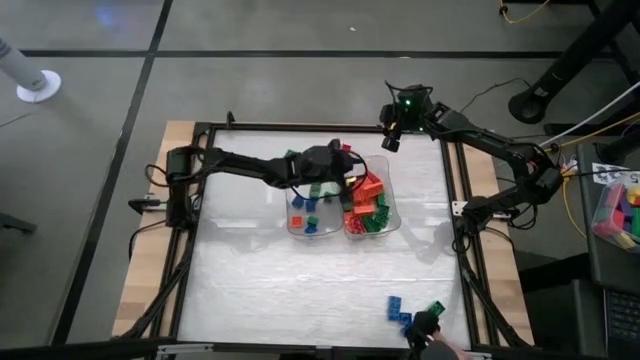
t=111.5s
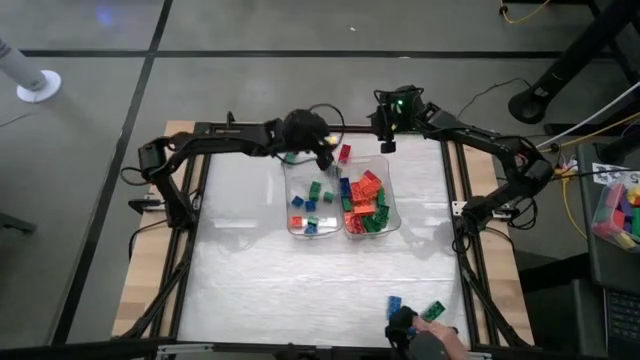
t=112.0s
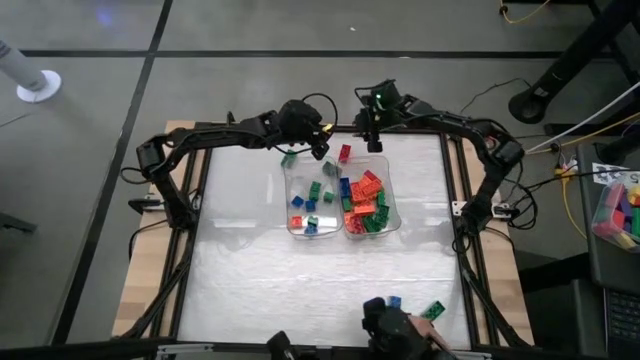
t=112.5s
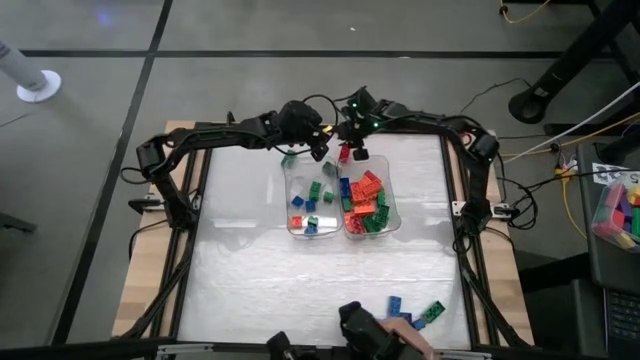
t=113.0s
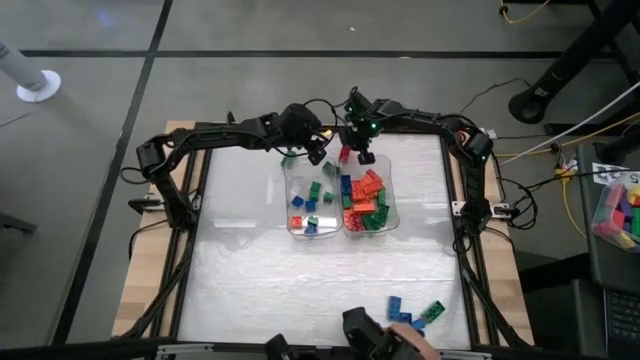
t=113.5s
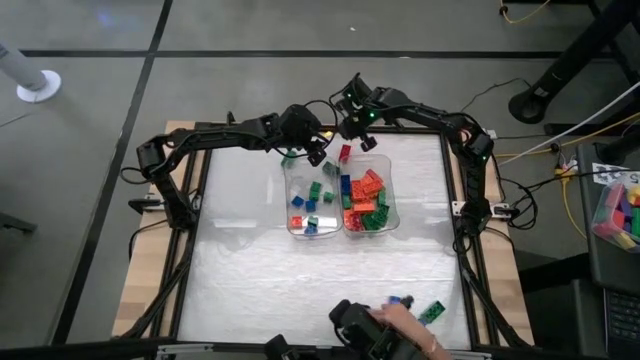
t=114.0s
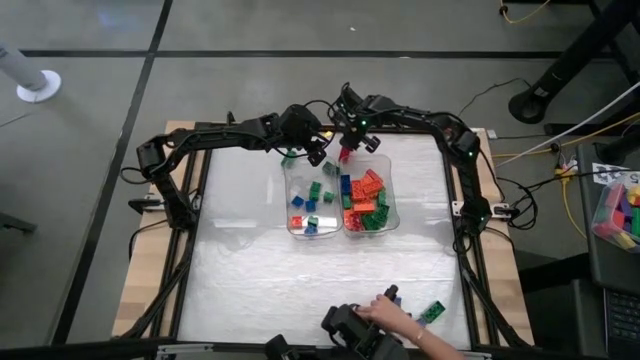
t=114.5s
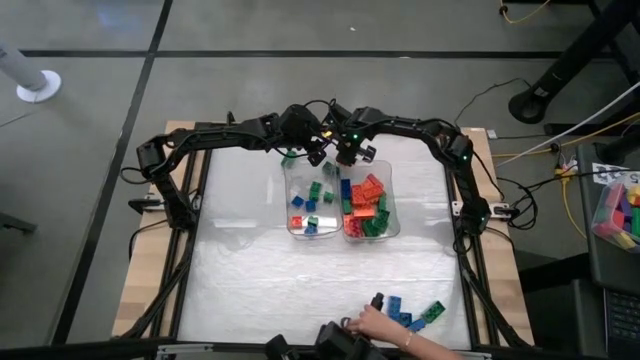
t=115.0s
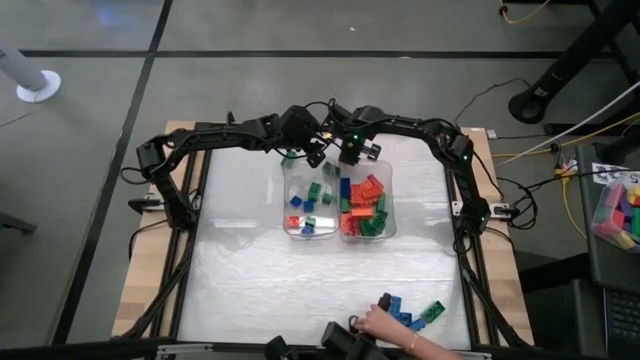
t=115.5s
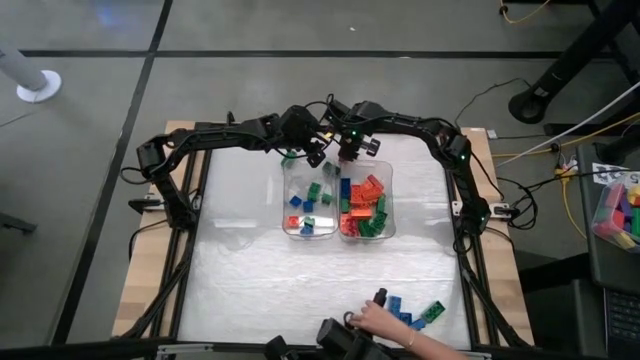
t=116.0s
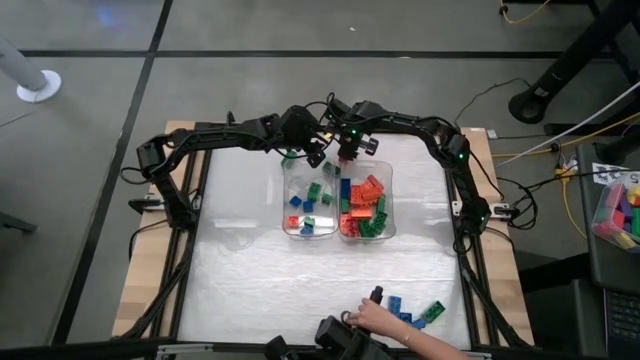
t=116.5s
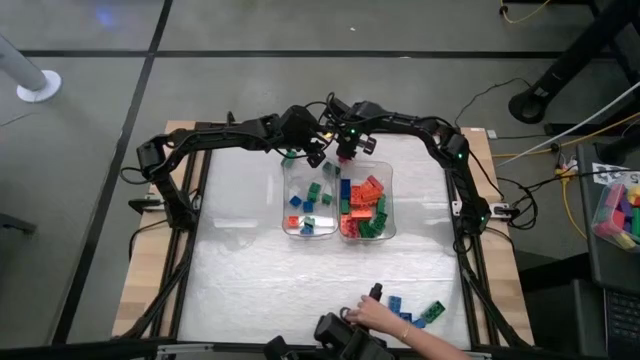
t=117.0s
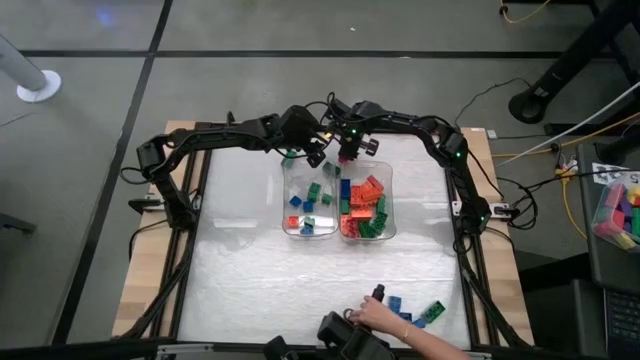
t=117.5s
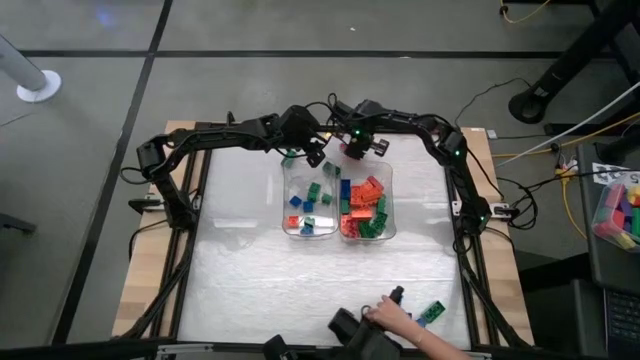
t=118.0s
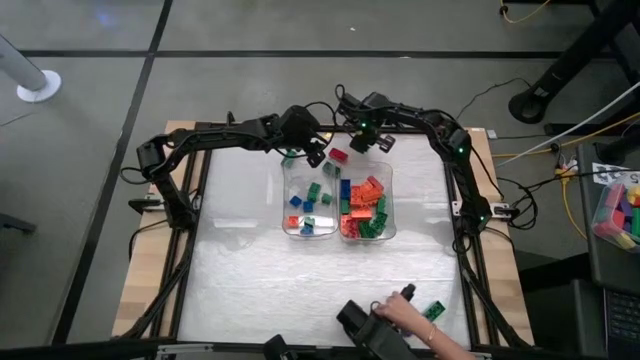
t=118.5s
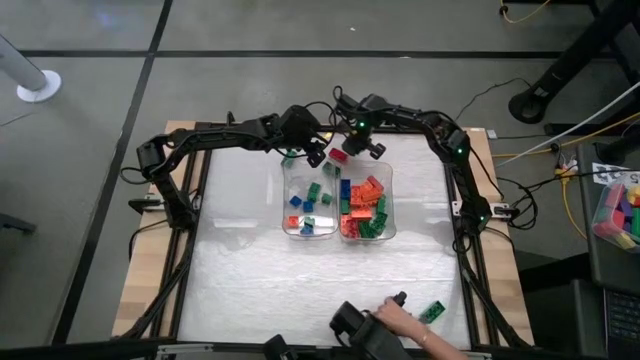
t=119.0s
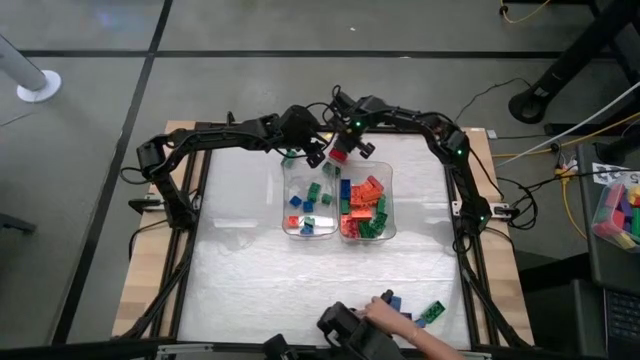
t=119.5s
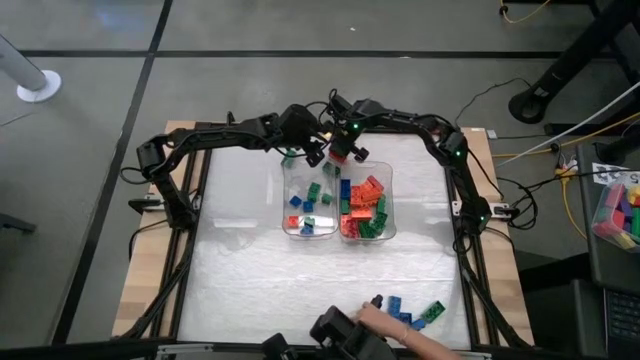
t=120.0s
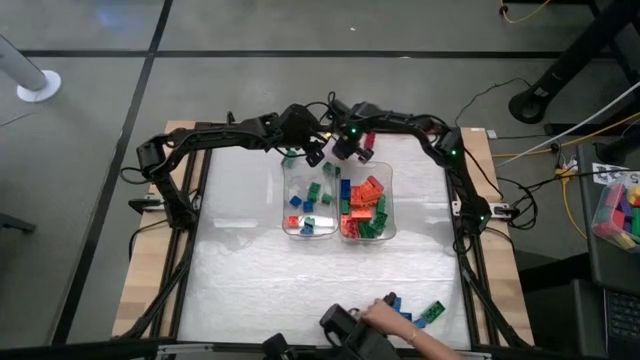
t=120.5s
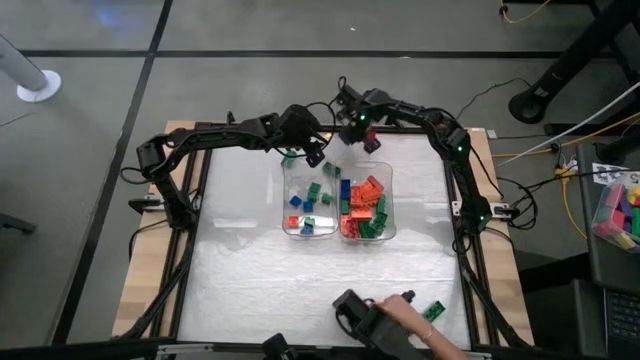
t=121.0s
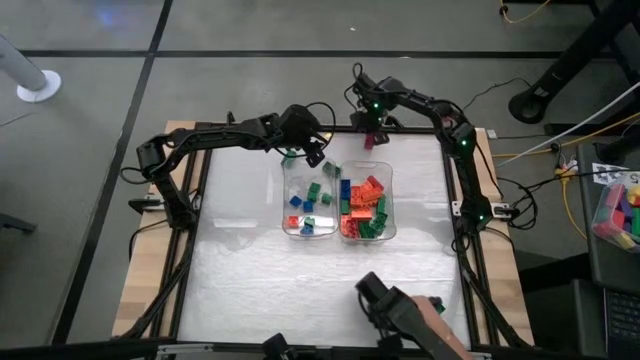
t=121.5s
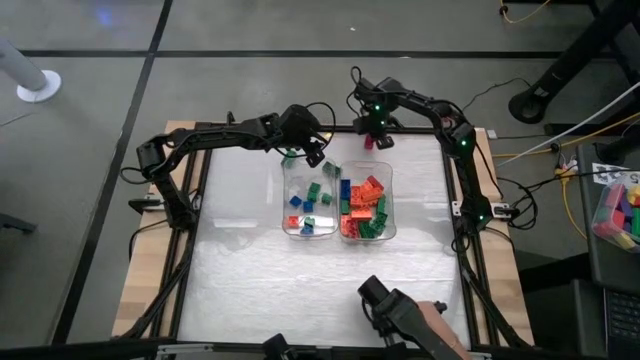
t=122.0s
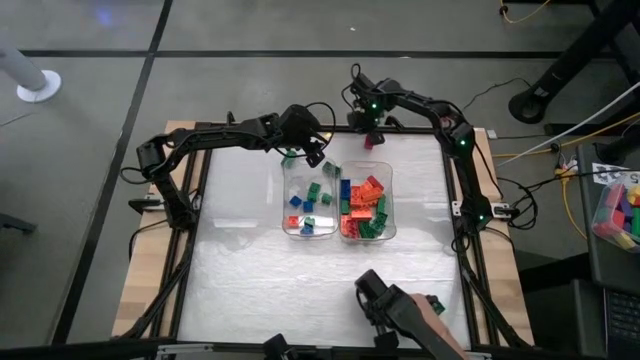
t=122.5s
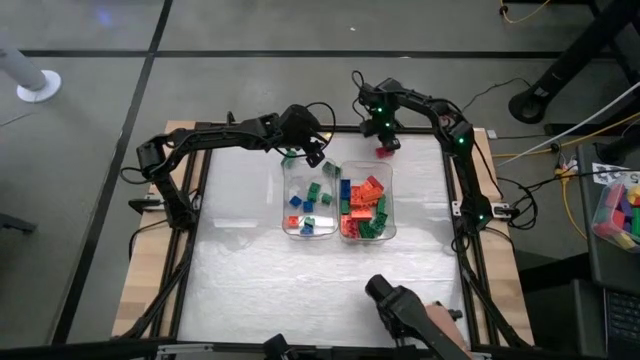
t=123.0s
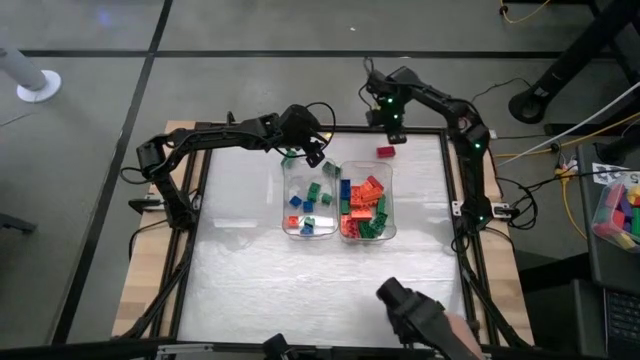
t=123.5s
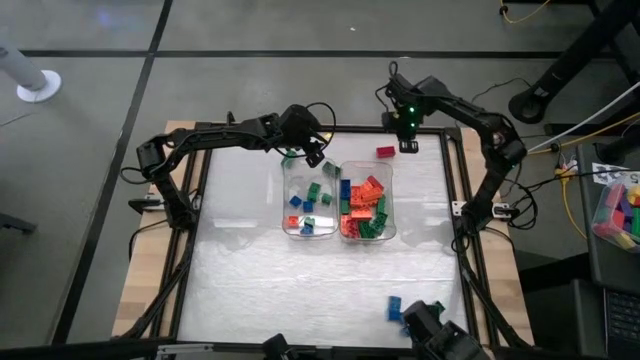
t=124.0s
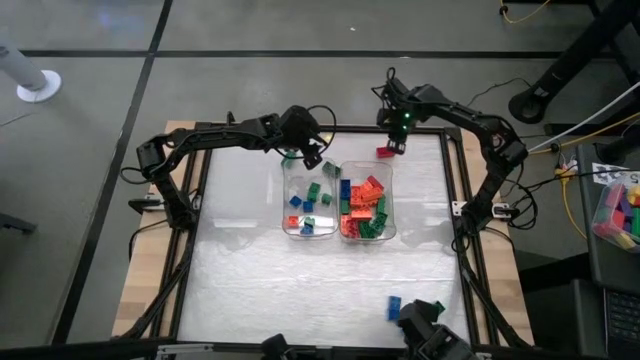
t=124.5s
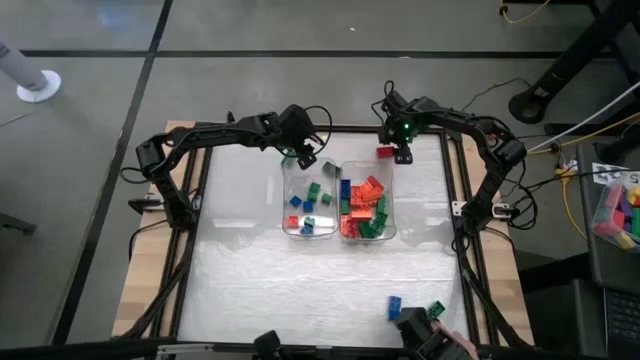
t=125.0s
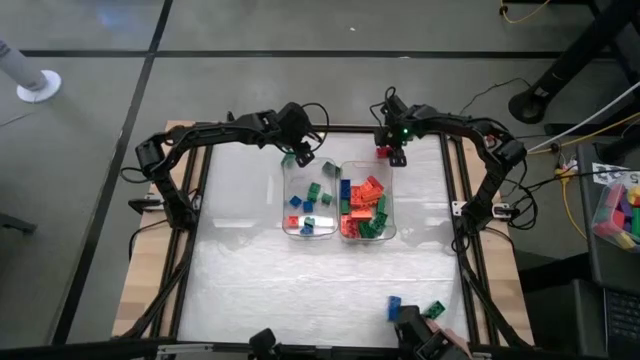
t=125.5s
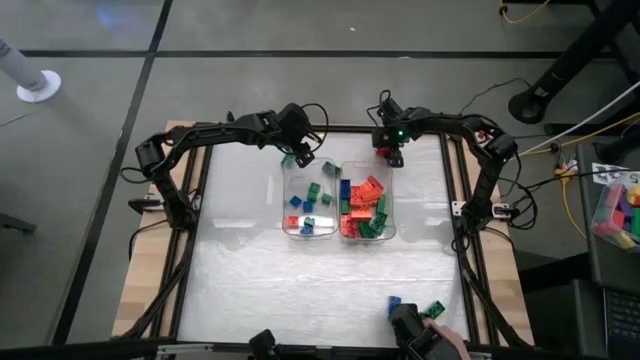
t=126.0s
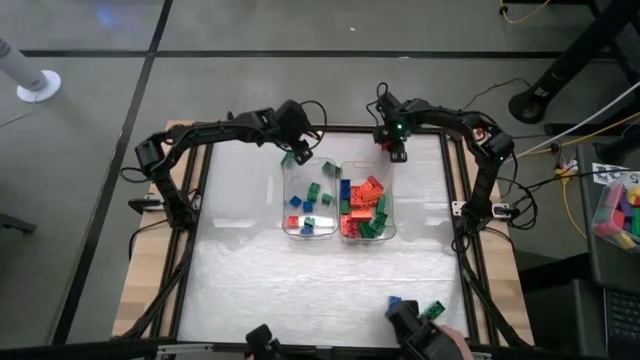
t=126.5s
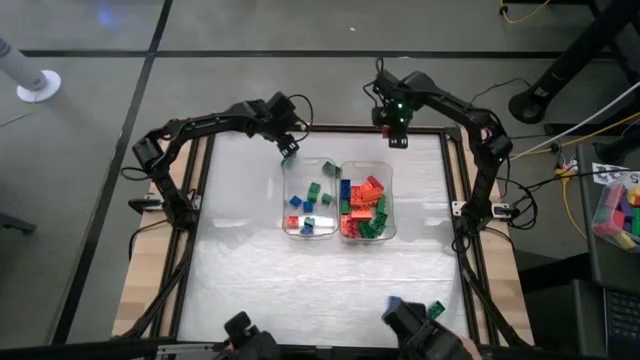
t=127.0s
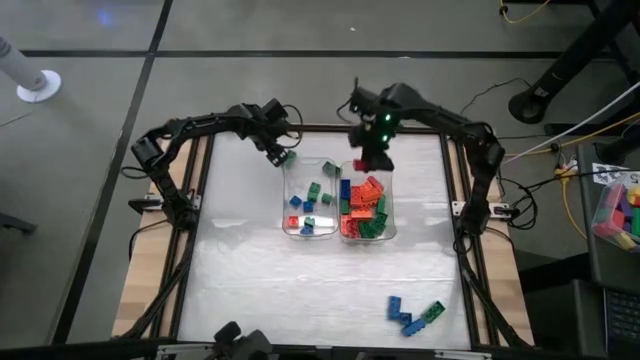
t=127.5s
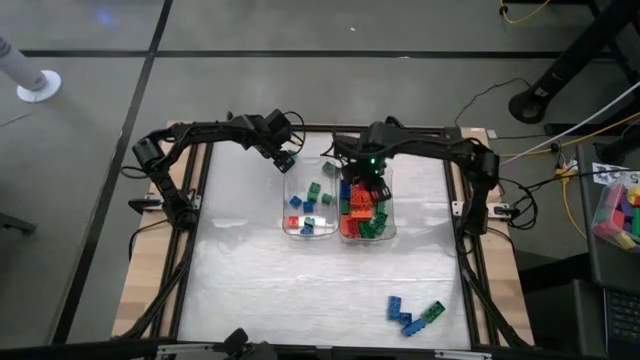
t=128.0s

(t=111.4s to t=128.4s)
Task: Sort blocks by size
Put the red rectangular game piece into the right transparent bin

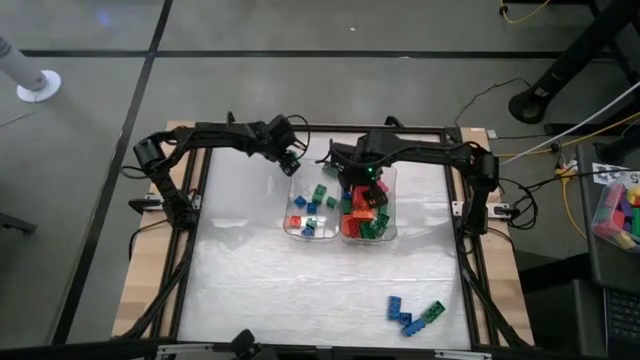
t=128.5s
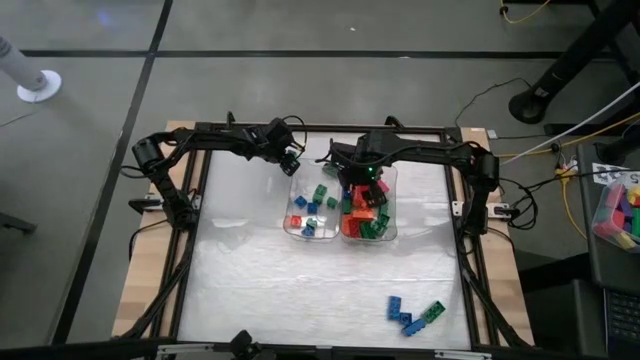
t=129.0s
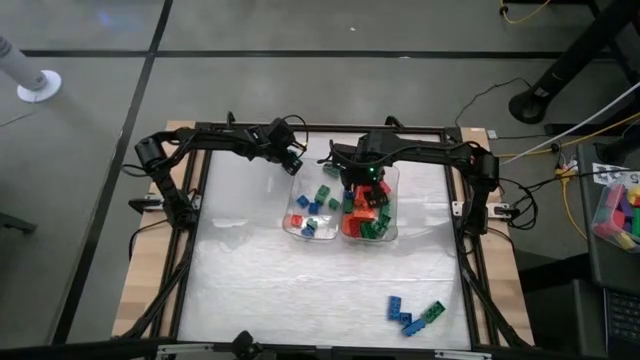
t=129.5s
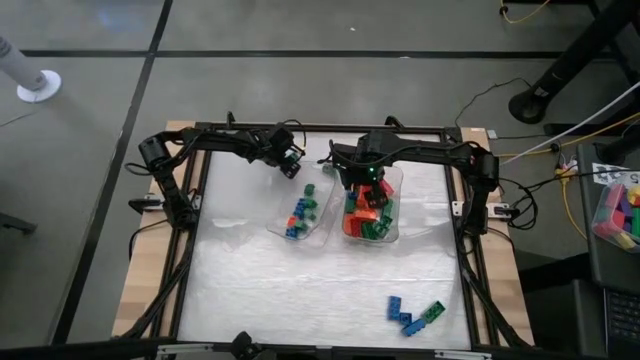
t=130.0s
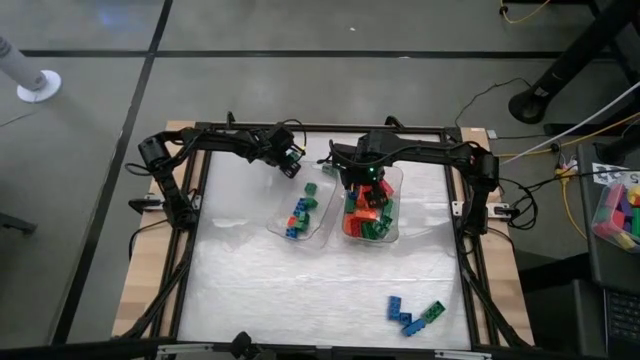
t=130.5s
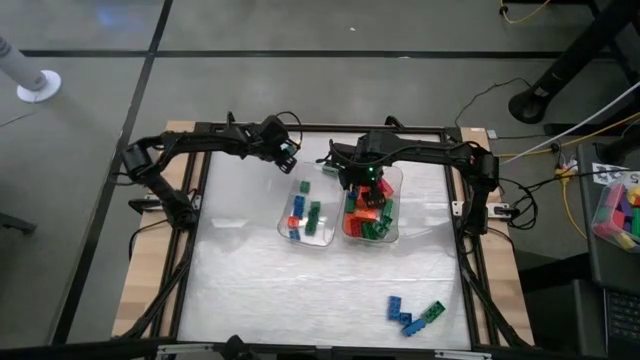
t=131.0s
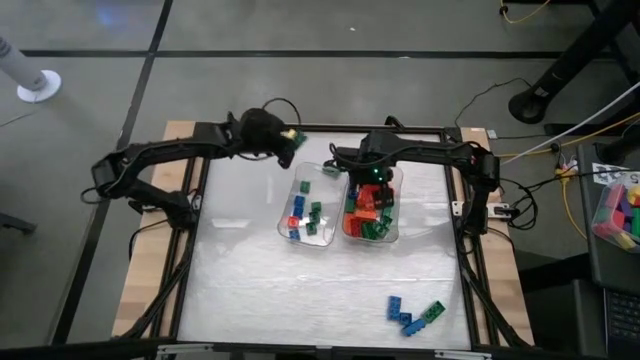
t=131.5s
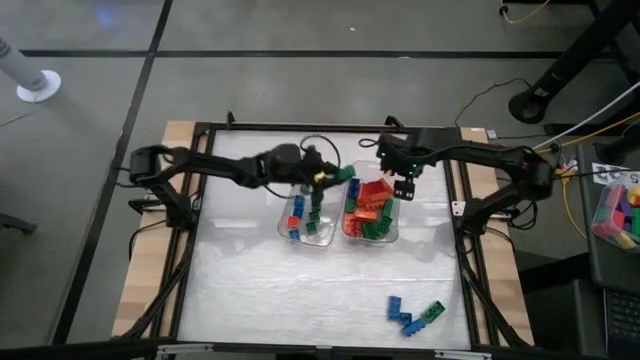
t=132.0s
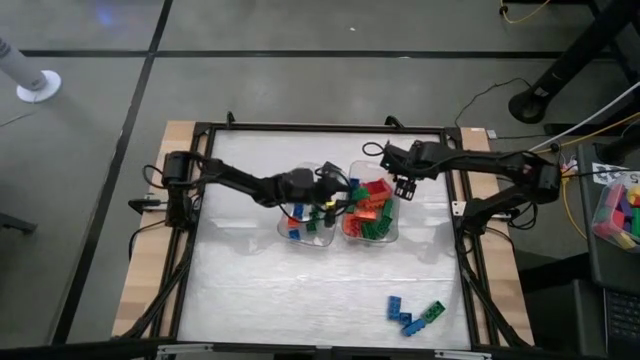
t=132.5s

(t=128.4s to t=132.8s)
Put the green rectangular game piece into the right transparent bin
